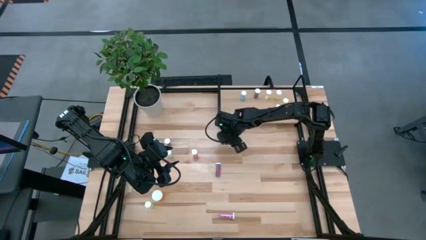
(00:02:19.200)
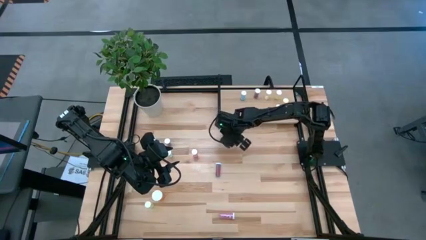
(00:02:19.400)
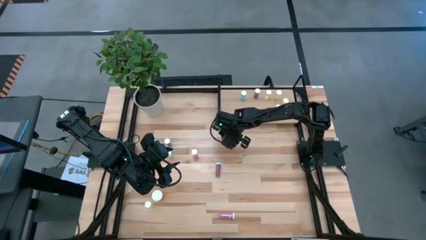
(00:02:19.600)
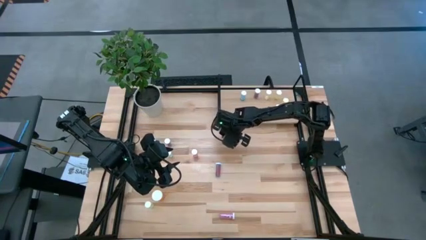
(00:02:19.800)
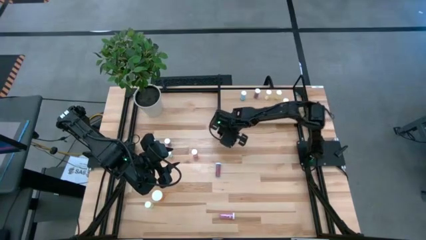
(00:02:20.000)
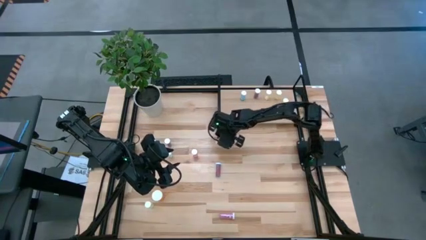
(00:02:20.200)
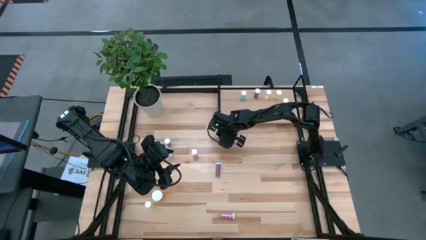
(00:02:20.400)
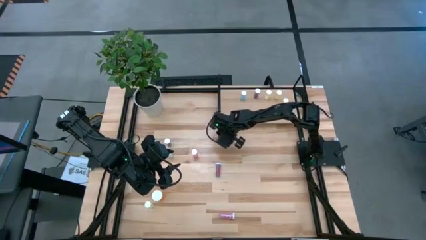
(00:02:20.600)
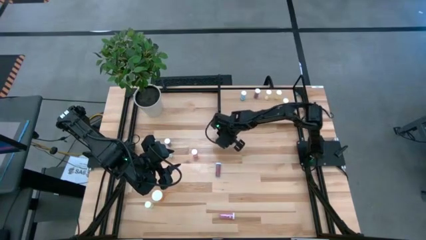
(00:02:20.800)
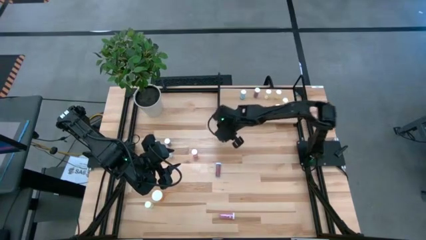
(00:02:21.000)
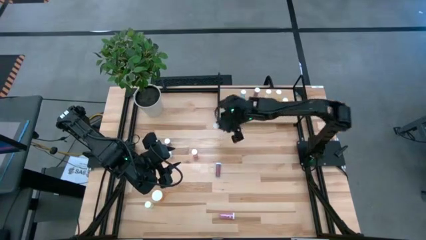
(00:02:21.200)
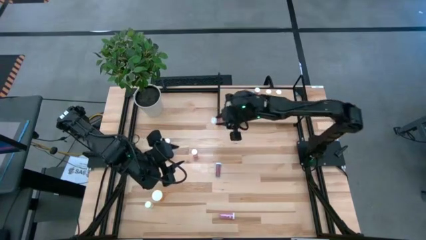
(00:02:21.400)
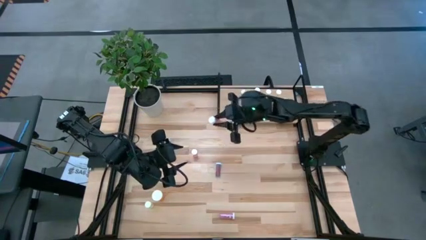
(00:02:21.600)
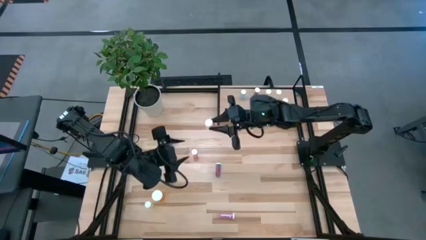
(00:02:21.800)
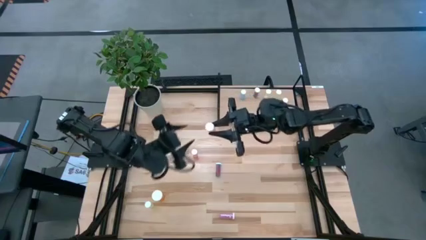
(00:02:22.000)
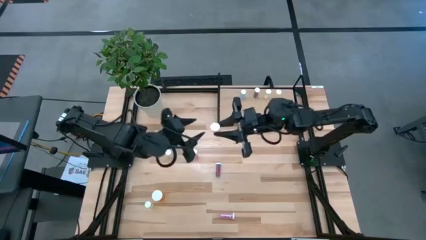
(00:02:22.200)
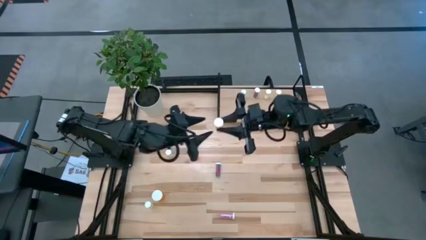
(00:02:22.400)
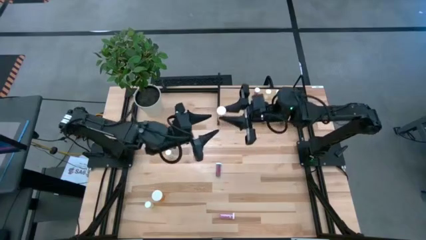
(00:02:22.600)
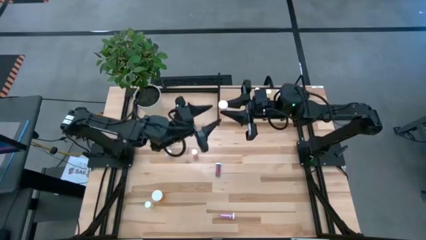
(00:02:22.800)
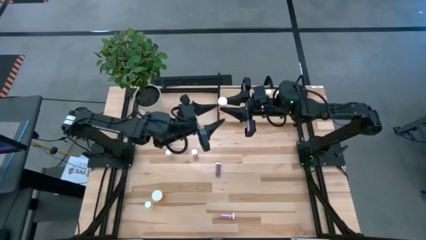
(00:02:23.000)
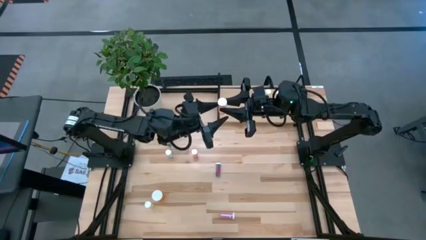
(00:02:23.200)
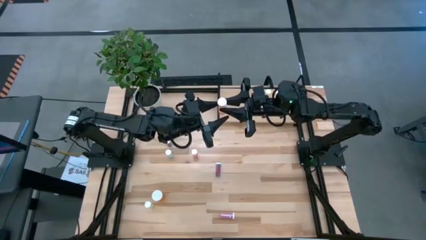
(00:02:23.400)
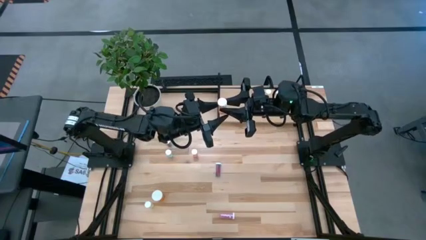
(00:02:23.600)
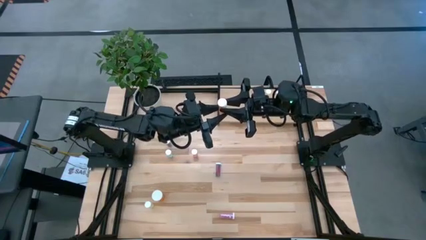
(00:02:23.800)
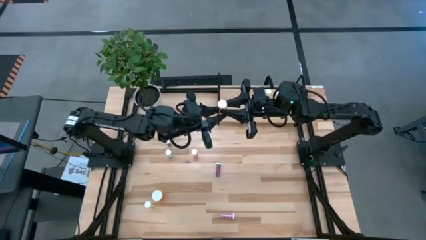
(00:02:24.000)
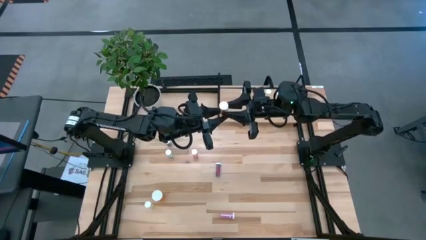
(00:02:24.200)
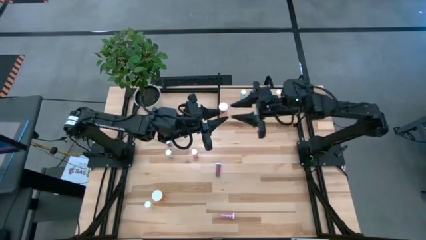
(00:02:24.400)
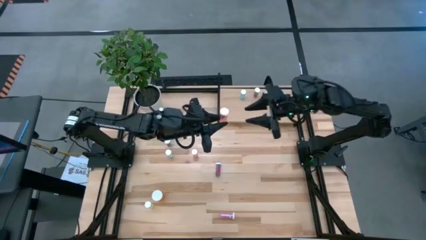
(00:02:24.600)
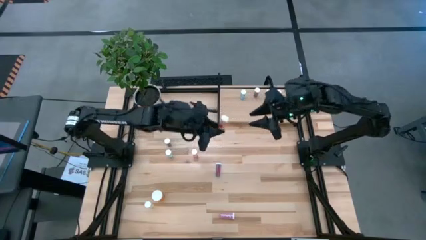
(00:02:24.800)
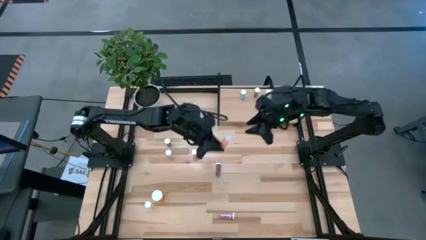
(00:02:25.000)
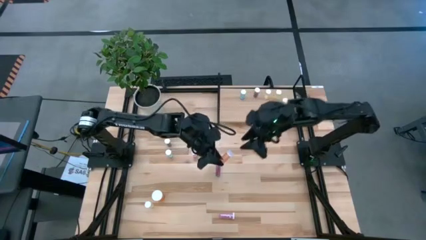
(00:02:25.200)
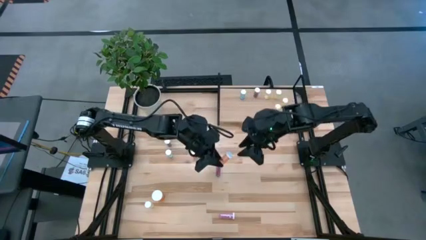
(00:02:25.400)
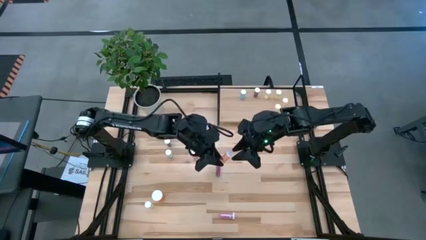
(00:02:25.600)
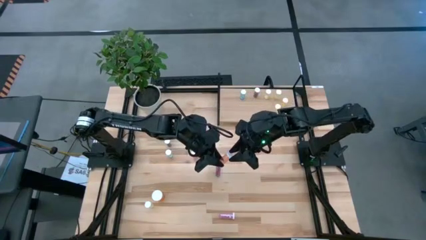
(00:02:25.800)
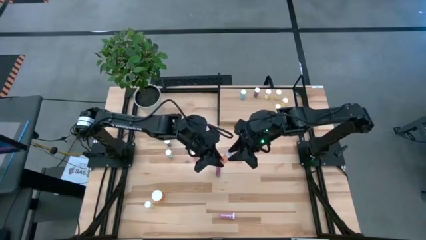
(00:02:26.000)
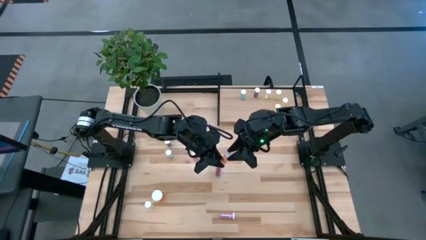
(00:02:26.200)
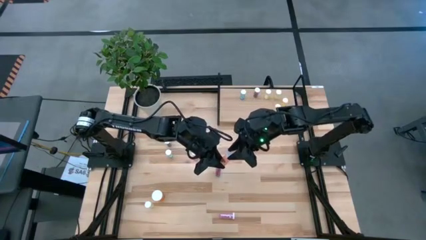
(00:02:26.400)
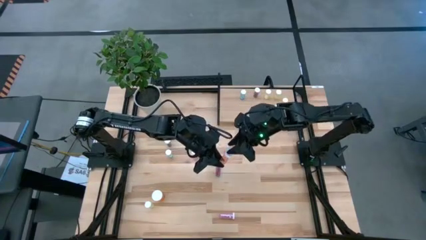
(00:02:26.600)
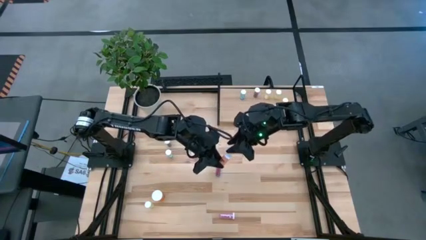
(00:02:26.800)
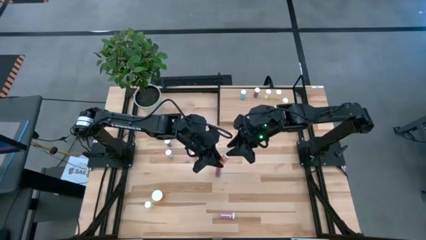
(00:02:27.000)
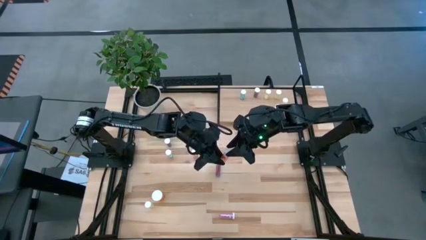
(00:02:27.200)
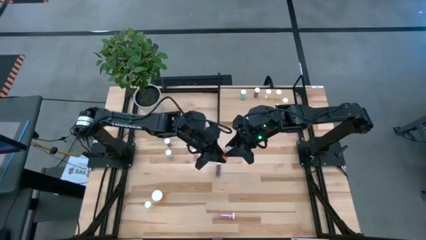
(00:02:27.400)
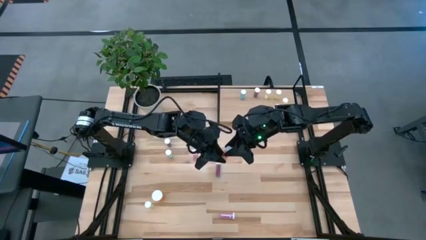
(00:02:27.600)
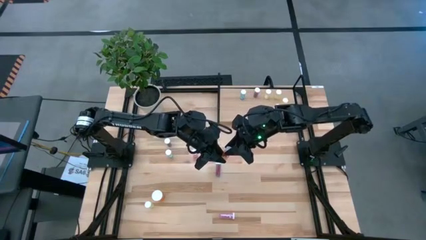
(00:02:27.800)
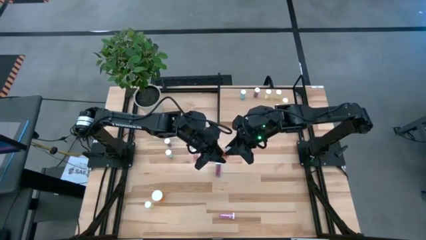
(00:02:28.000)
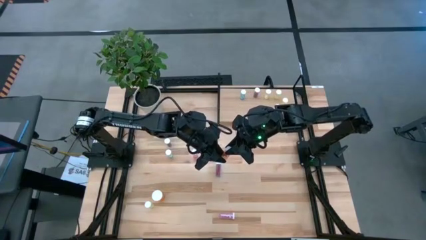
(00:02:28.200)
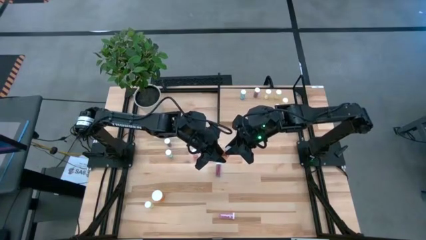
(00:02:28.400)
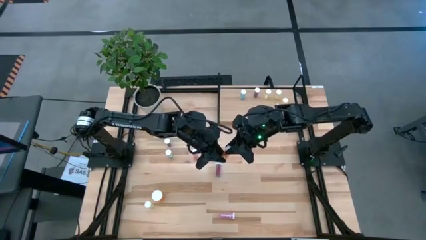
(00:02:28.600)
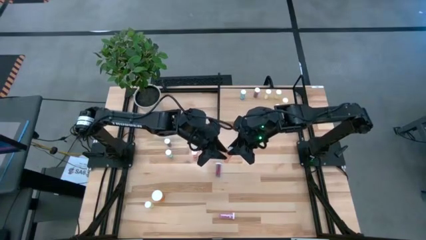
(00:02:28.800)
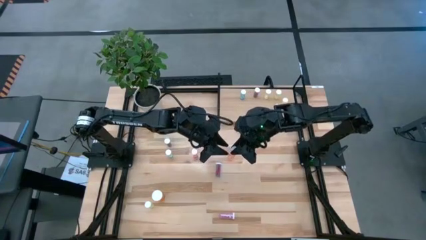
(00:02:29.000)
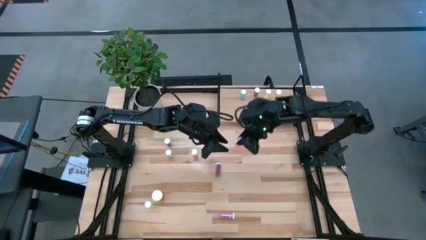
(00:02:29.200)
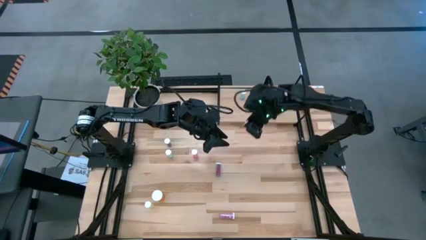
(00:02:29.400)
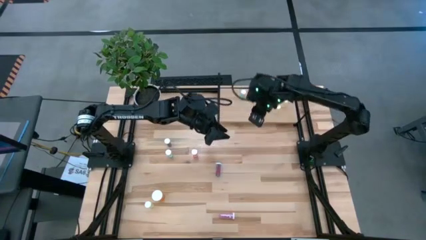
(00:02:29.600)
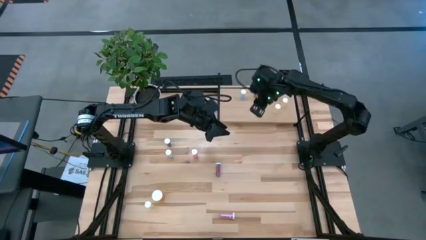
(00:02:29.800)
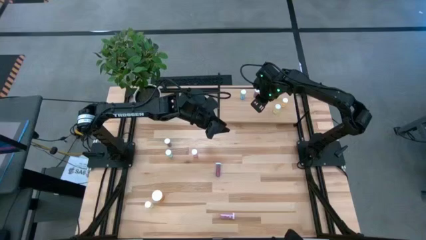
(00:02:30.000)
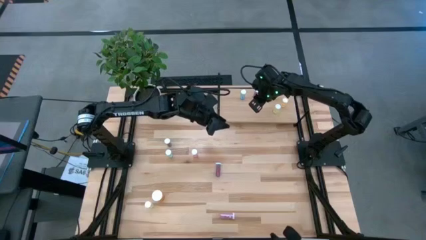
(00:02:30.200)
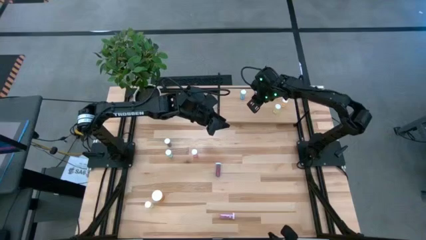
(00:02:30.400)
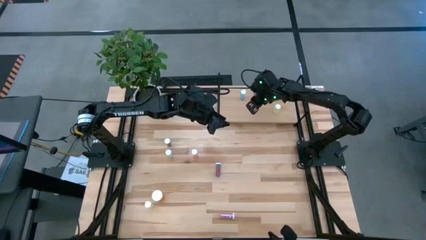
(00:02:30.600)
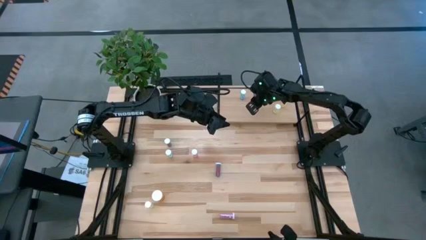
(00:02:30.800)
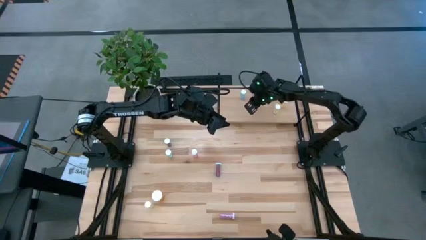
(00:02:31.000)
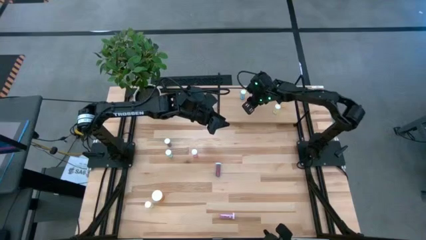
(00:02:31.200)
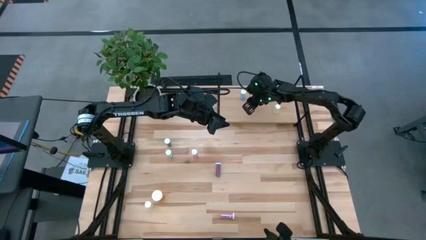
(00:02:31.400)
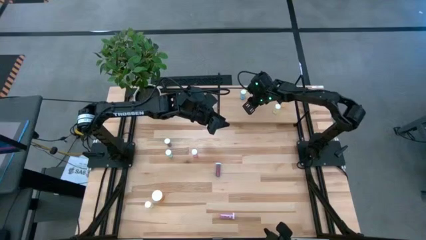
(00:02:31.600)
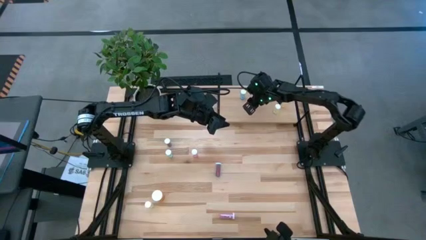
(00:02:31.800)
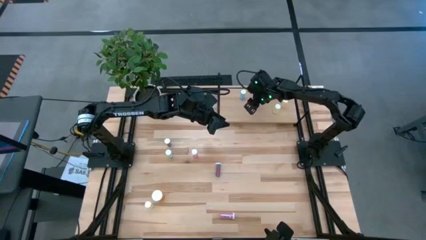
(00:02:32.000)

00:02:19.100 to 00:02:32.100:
Task: Pick and place medicine bottles onto shelf by color
Put the top orange pill bottle on the shelf
